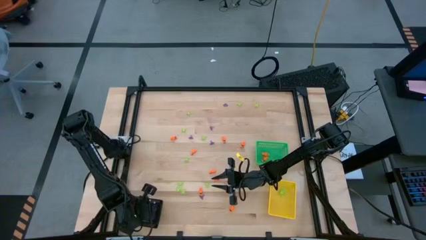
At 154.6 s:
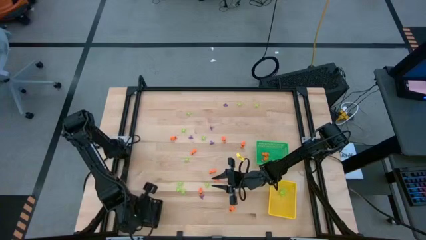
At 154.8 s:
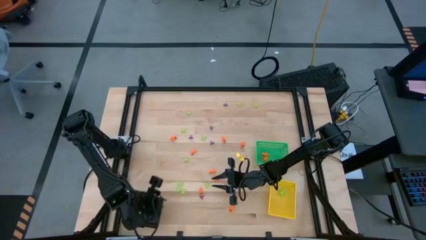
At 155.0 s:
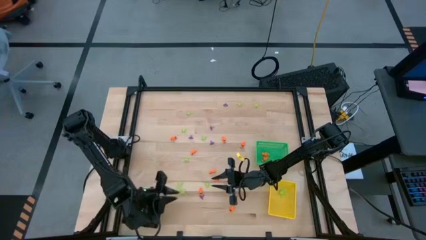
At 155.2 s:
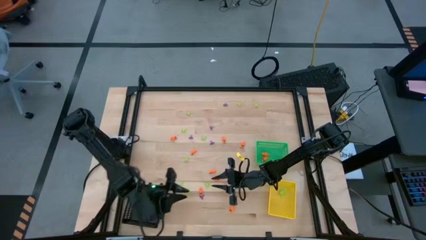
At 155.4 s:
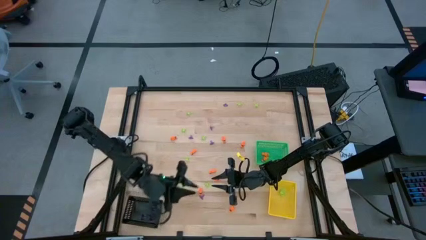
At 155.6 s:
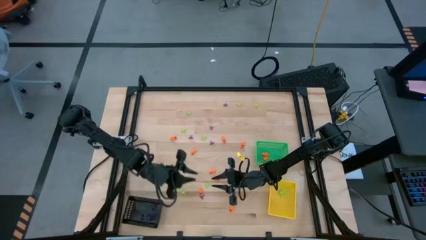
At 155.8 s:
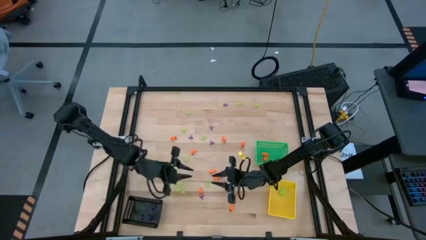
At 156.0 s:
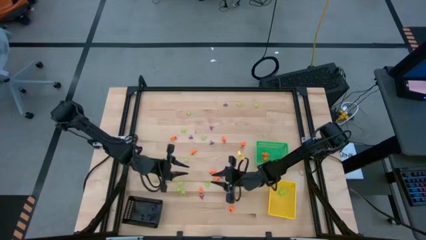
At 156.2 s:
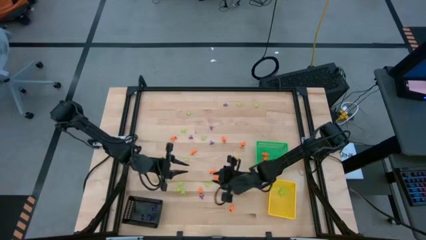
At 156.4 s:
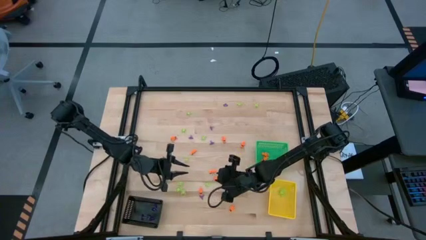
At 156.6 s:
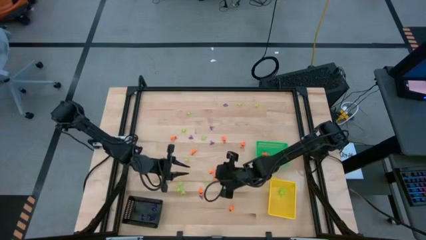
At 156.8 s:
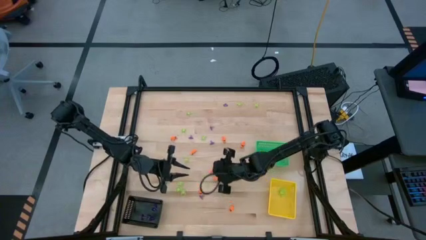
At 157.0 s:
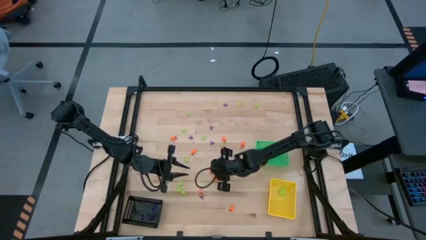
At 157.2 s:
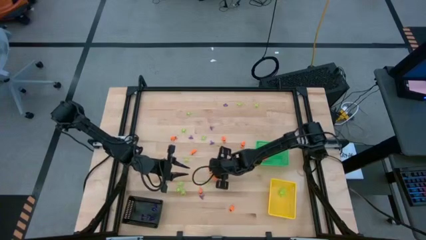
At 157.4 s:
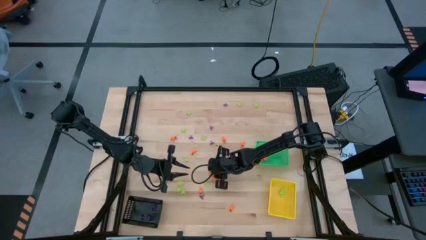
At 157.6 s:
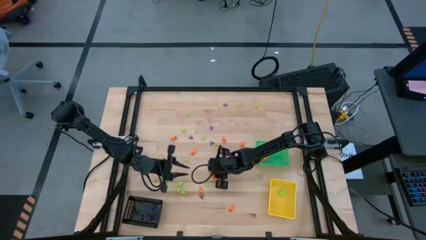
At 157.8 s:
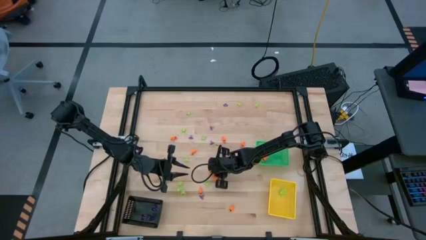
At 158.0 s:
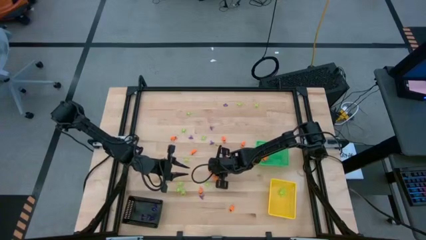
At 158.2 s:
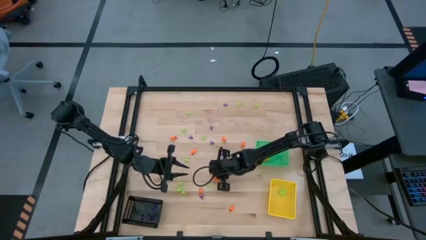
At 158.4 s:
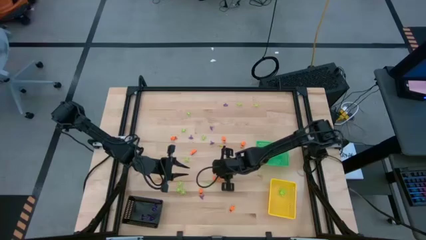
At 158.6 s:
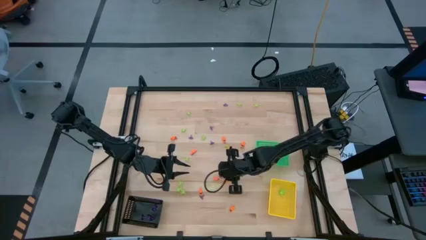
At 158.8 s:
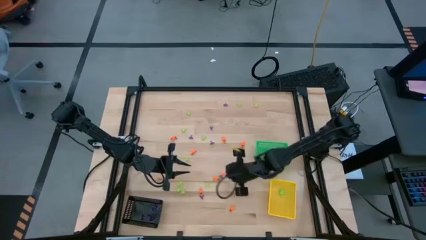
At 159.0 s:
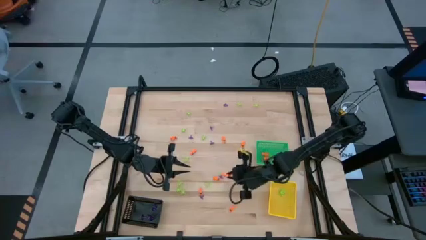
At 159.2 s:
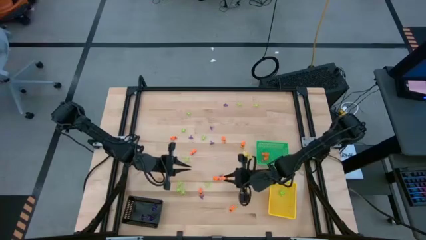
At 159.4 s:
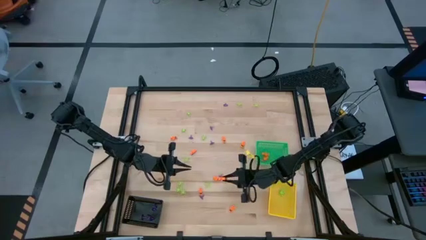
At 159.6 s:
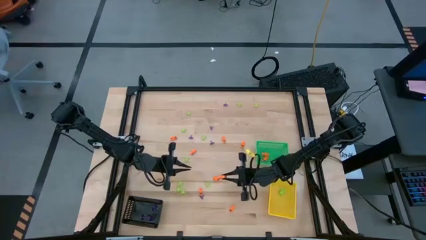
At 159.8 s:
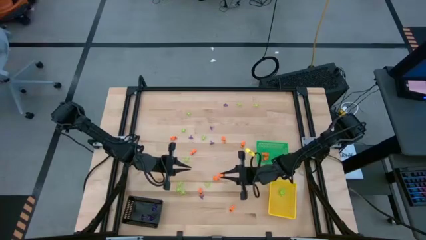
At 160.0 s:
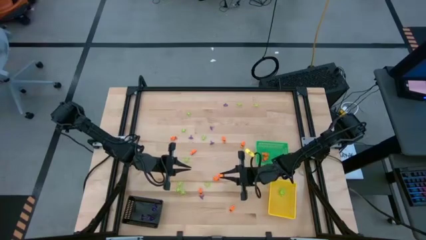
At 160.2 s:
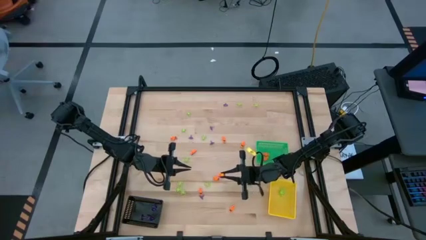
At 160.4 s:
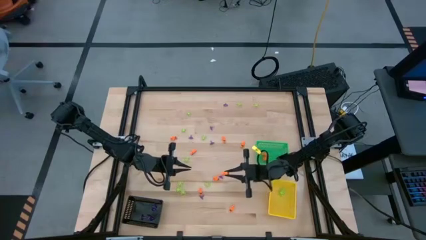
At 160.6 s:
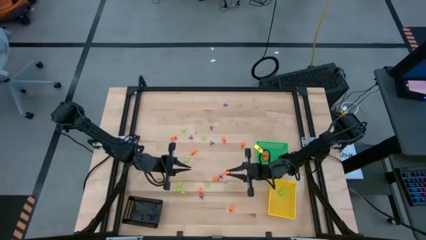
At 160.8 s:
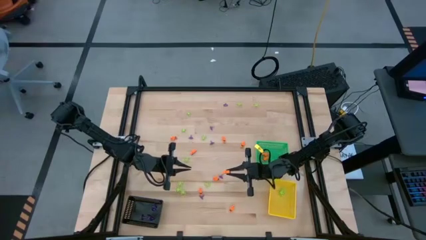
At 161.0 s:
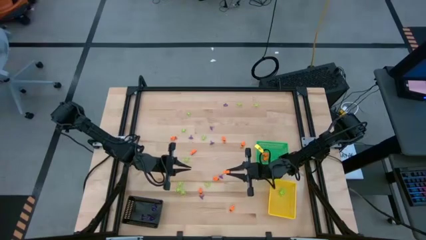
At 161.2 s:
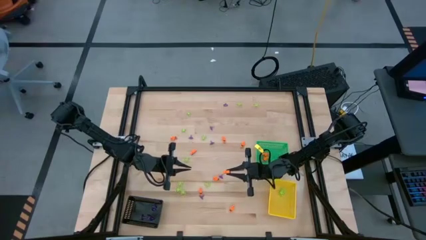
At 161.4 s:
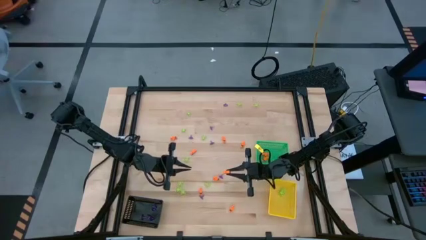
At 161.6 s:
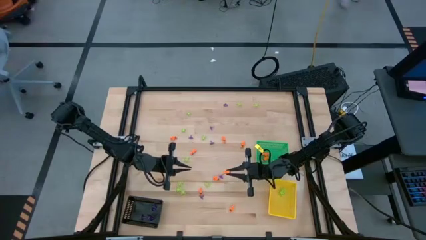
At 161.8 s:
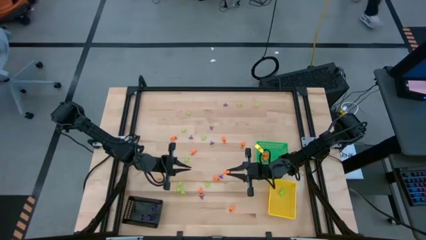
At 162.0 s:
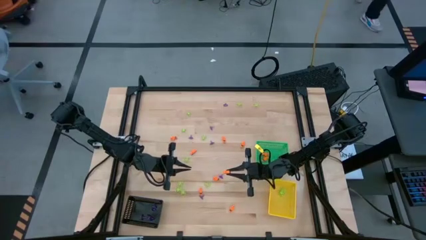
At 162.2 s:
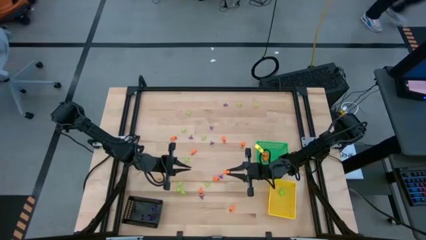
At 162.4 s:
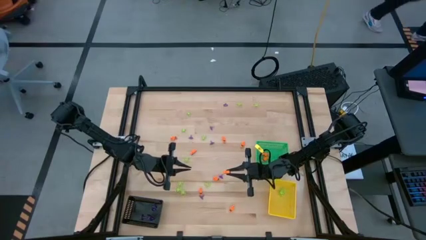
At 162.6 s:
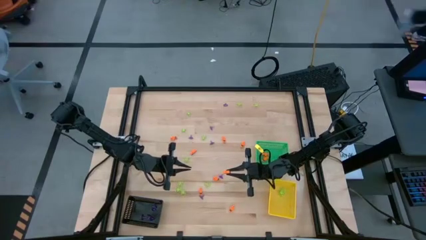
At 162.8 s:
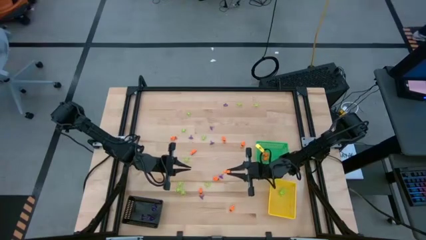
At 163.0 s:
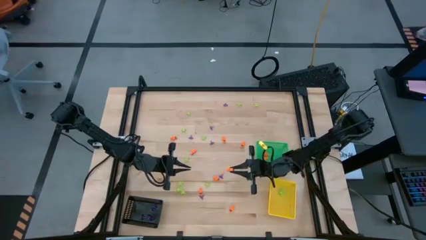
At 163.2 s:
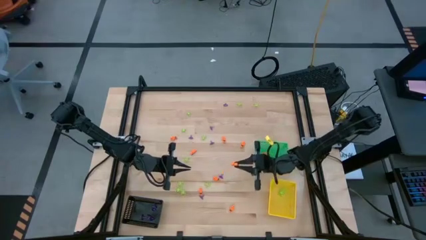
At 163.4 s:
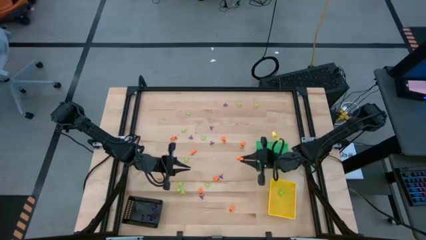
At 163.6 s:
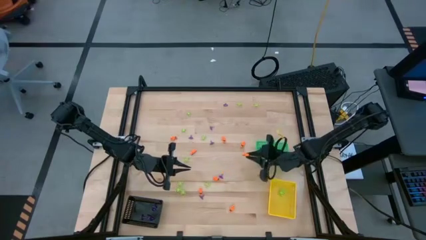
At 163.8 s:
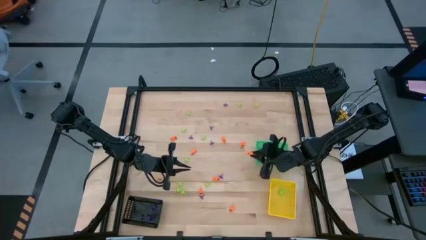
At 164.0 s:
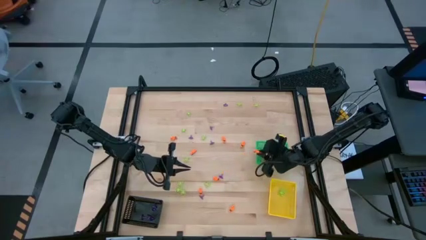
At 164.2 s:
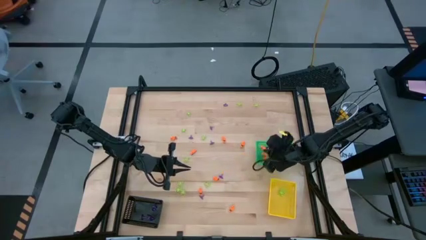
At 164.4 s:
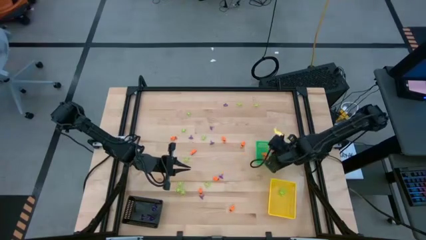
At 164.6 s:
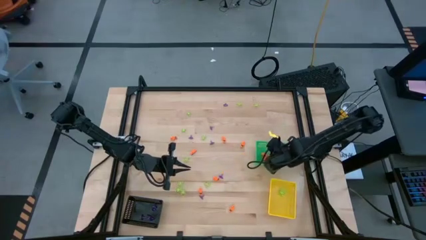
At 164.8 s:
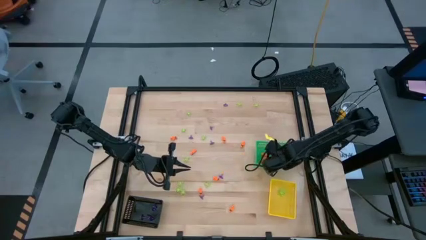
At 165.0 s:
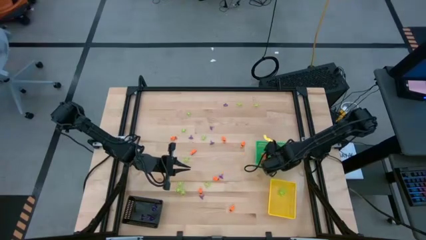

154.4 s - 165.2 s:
Task: Sort Halloween decoration
Put the orange skeleton toy into the green bin

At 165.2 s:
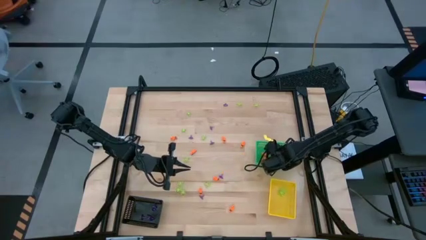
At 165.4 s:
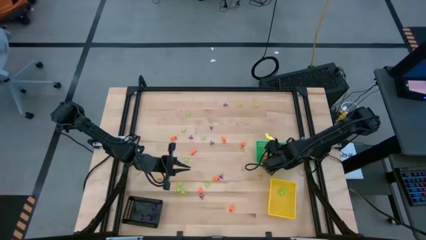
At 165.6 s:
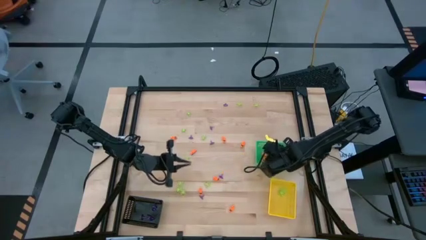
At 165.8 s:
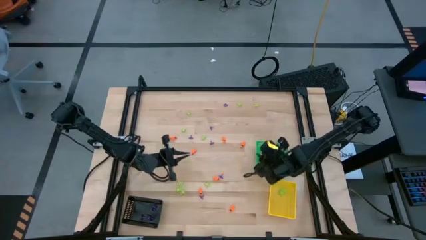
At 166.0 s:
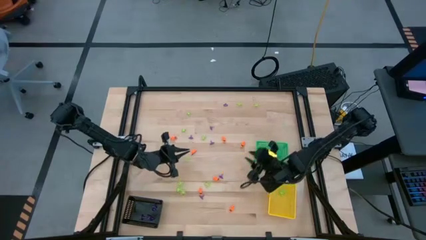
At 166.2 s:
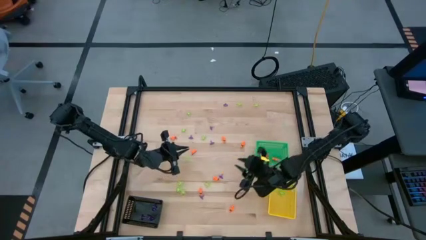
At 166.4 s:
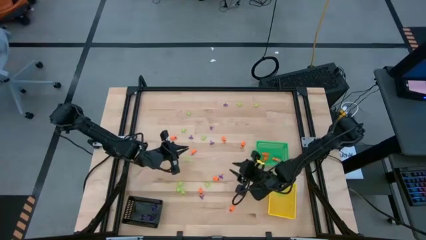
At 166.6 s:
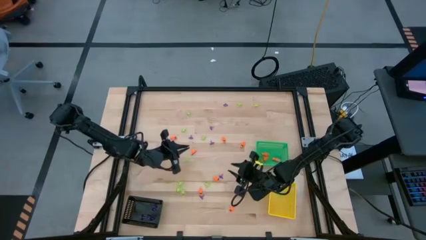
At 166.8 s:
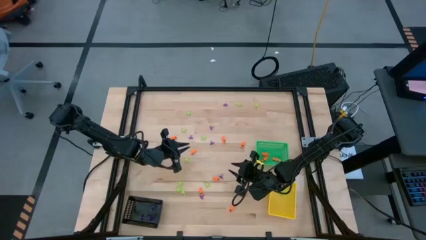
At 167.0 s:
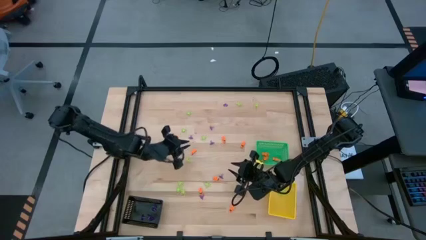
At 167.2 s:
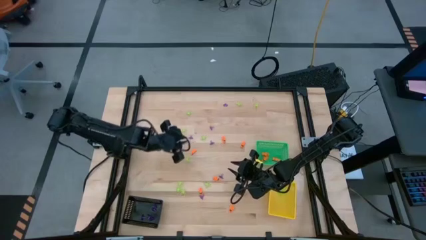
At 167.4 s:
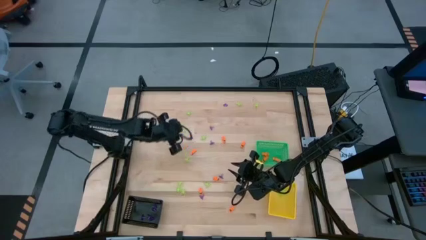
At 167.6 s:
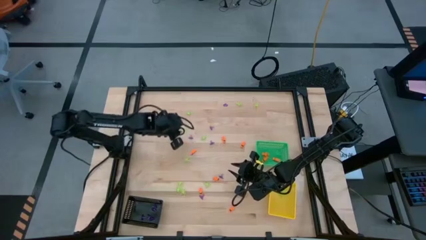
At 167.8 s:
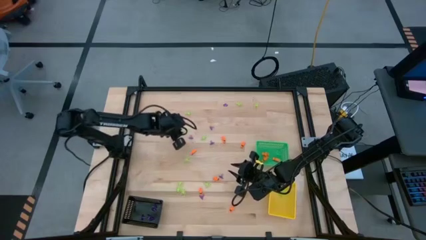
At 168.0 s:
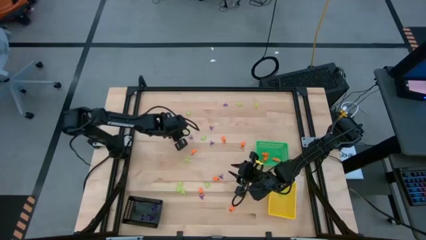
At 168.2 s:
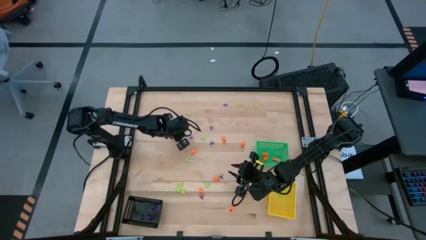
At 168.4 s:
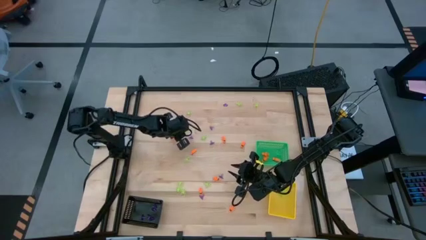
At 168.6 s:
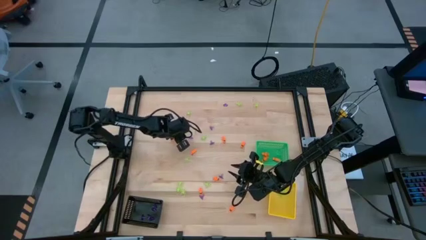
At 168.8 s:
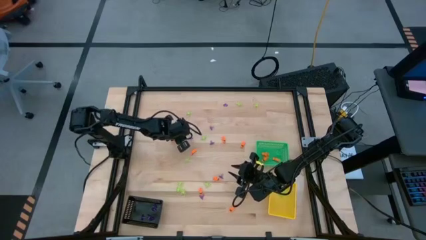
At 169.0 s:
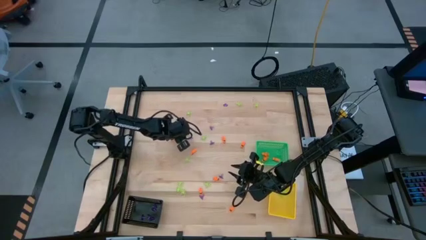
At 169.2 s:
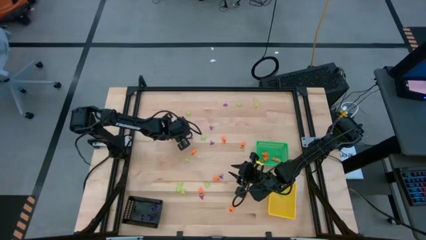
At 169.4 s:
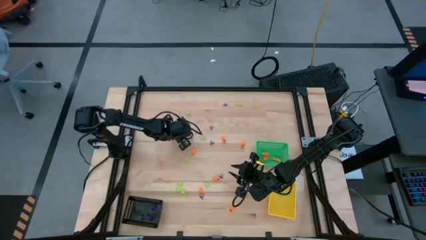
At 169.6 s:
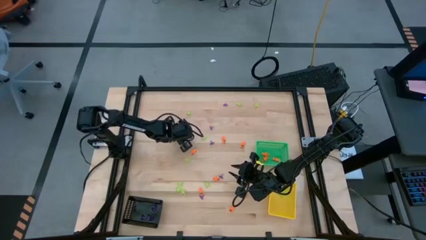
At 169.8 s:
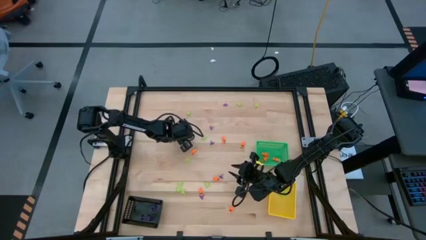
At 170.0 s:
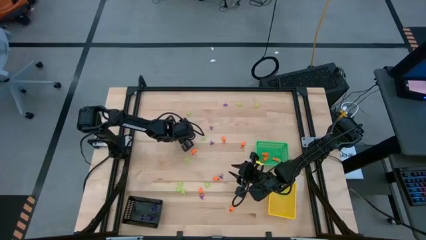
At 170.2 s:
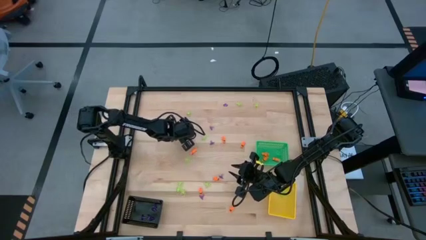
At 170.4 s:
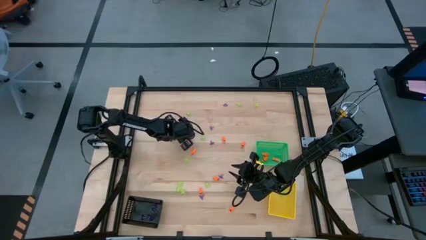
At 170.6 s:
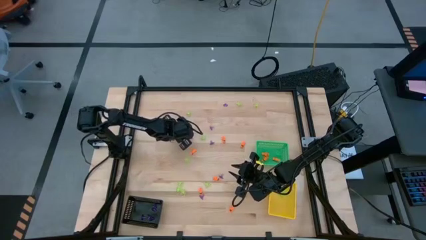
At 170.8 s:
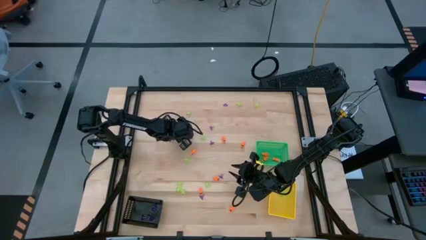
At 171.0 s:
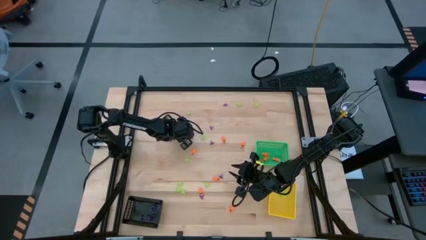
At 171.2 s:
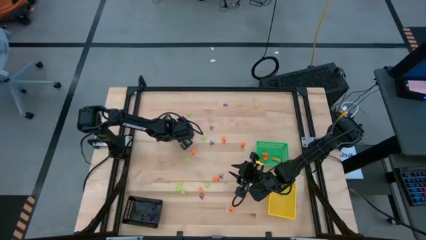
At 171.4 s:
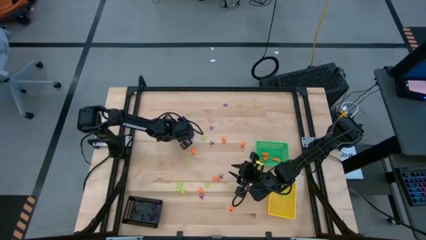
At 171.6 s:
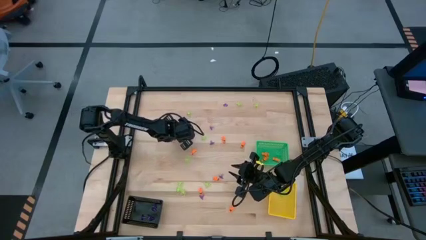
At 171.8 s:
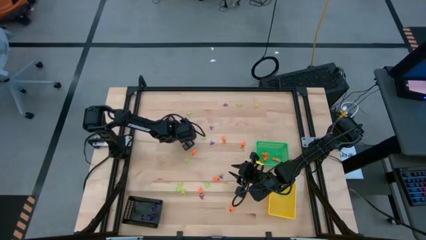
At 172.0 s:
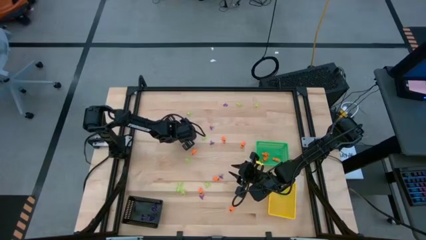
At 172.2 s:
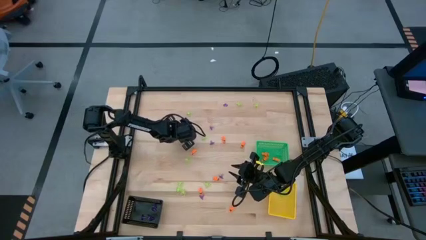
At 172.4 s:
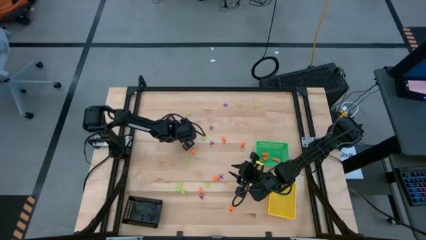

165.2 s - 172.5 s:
Put the green spider toy into the yellow bin
